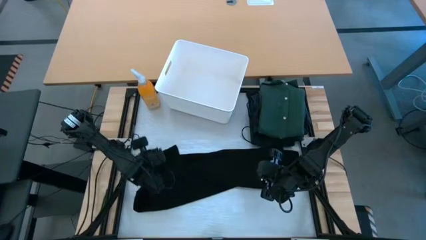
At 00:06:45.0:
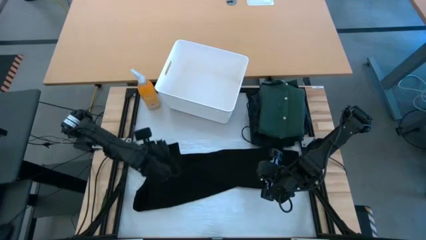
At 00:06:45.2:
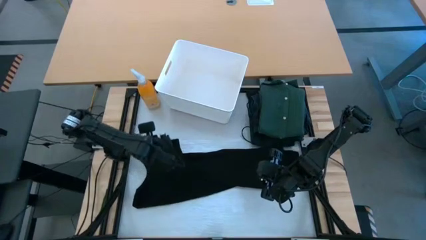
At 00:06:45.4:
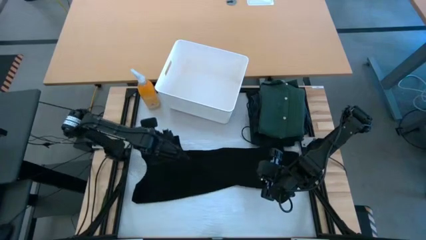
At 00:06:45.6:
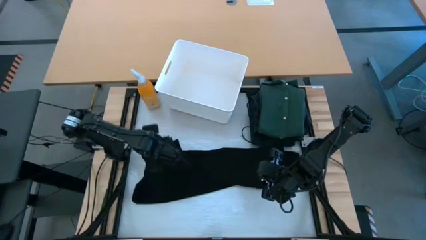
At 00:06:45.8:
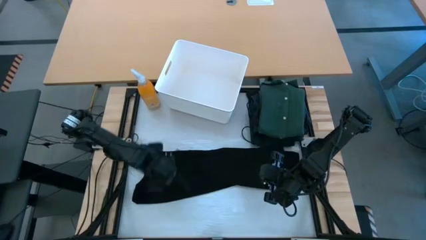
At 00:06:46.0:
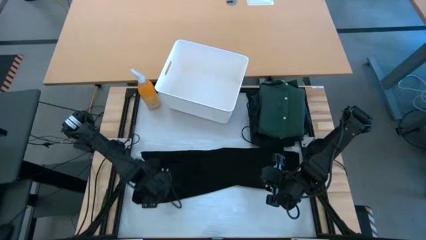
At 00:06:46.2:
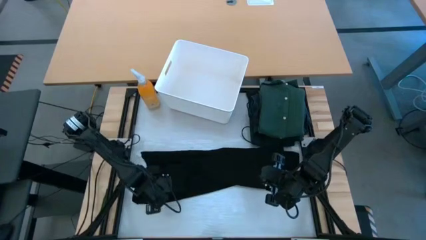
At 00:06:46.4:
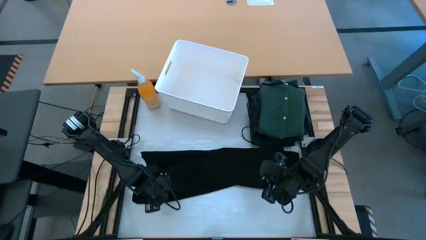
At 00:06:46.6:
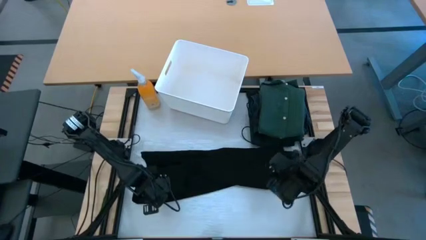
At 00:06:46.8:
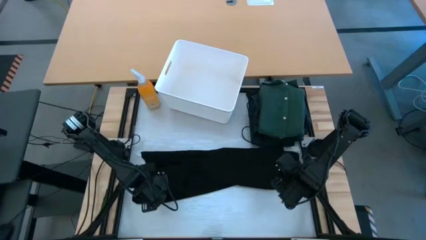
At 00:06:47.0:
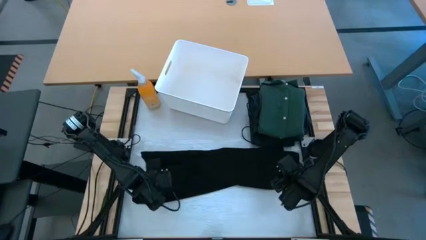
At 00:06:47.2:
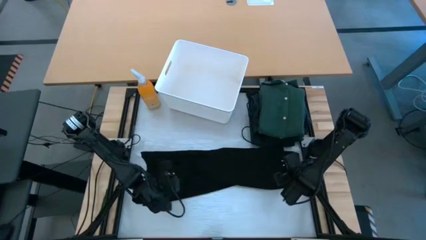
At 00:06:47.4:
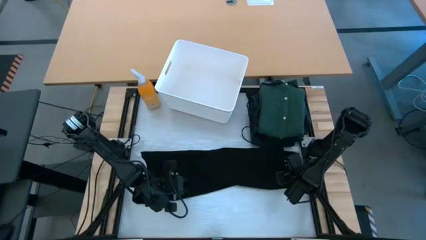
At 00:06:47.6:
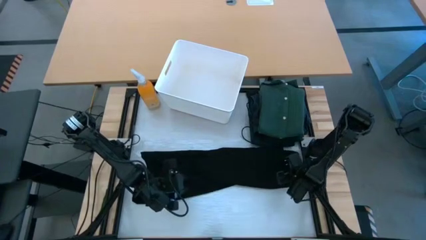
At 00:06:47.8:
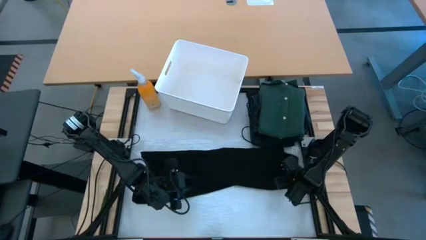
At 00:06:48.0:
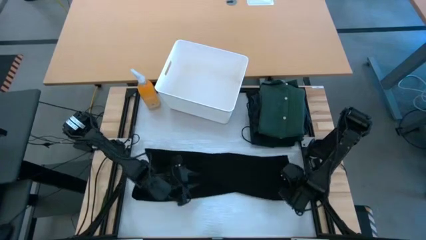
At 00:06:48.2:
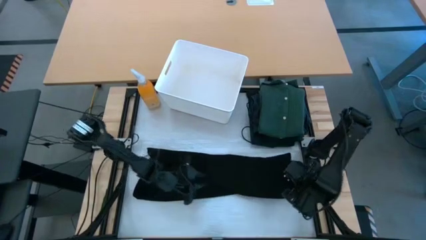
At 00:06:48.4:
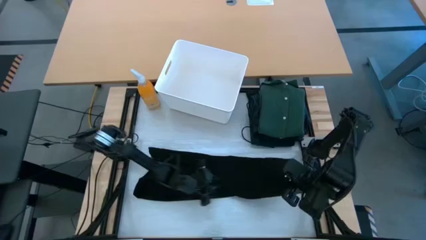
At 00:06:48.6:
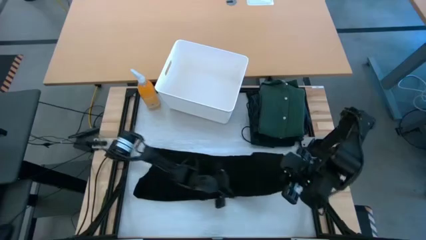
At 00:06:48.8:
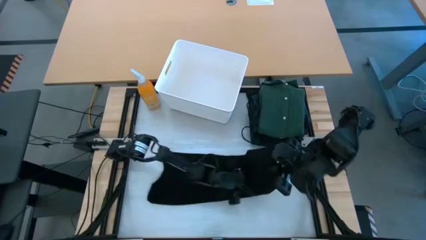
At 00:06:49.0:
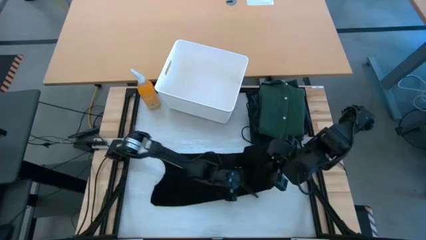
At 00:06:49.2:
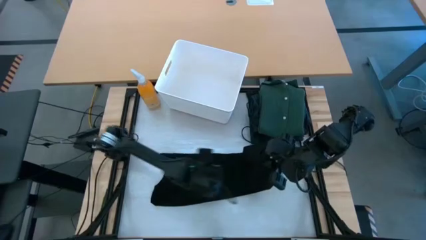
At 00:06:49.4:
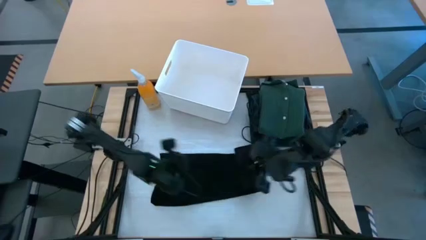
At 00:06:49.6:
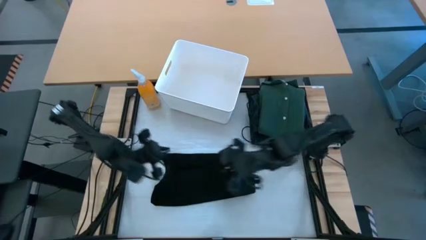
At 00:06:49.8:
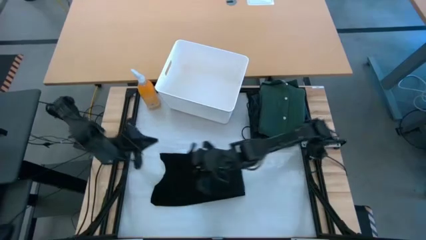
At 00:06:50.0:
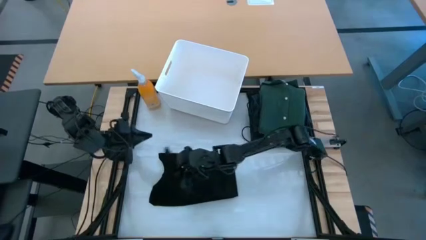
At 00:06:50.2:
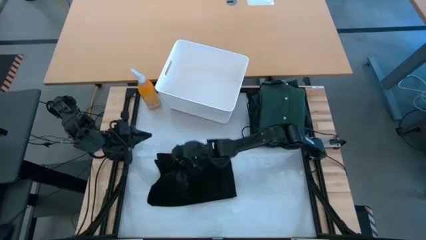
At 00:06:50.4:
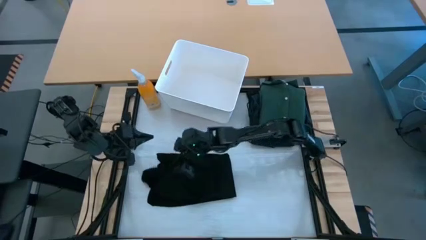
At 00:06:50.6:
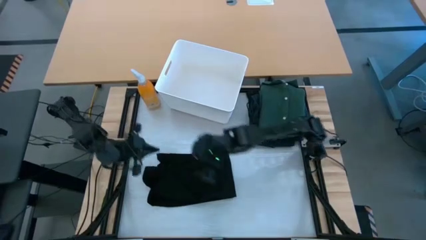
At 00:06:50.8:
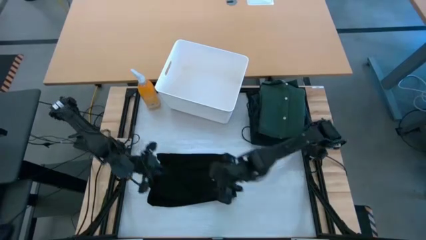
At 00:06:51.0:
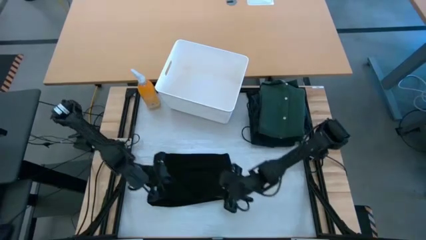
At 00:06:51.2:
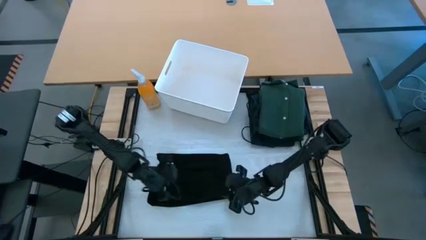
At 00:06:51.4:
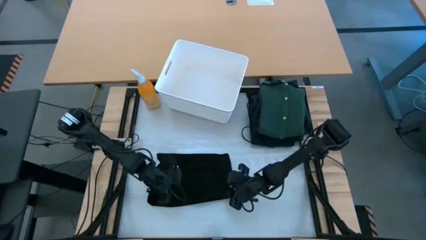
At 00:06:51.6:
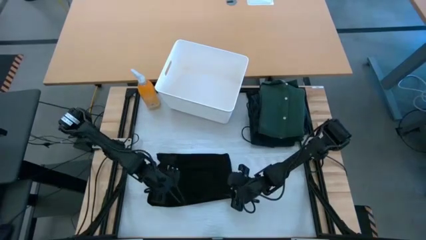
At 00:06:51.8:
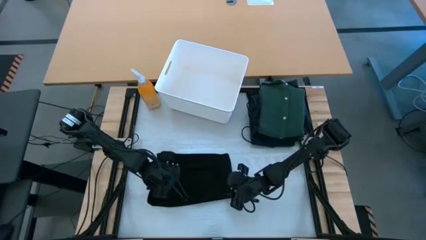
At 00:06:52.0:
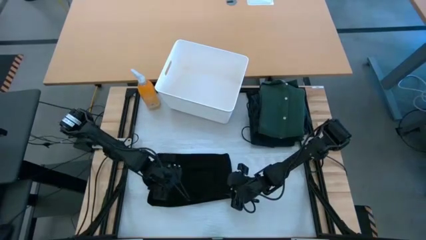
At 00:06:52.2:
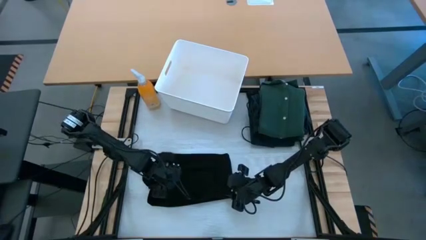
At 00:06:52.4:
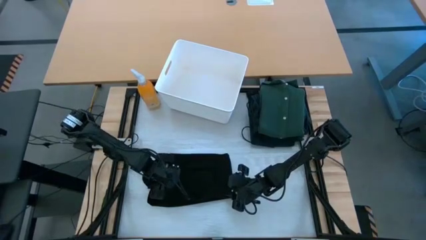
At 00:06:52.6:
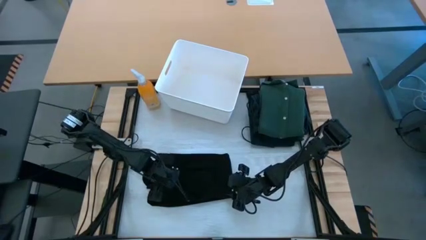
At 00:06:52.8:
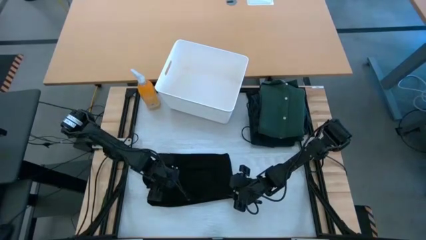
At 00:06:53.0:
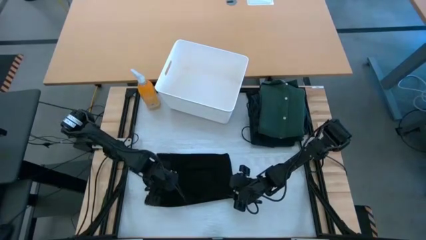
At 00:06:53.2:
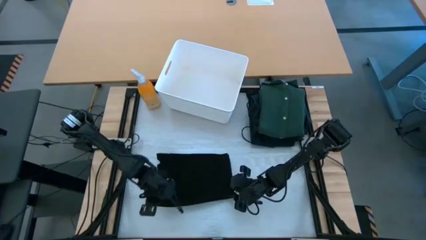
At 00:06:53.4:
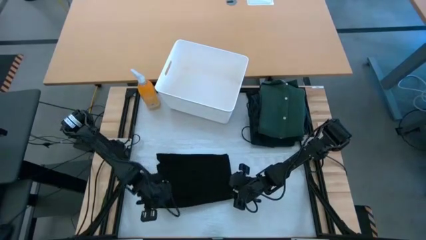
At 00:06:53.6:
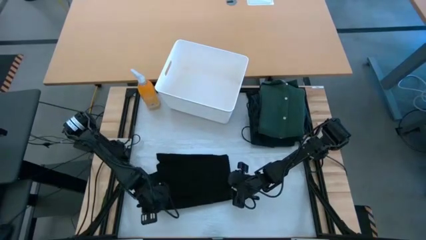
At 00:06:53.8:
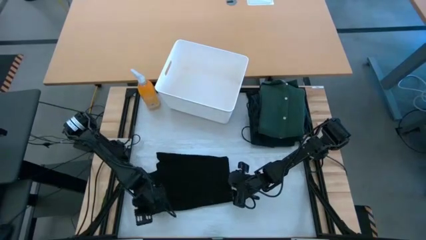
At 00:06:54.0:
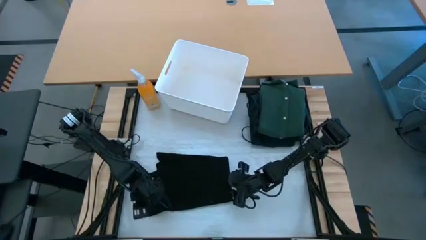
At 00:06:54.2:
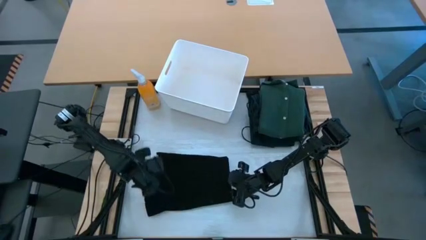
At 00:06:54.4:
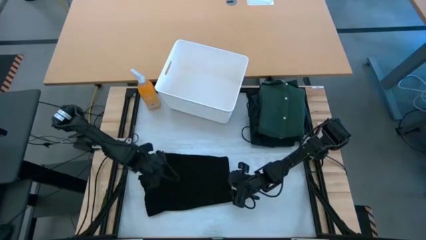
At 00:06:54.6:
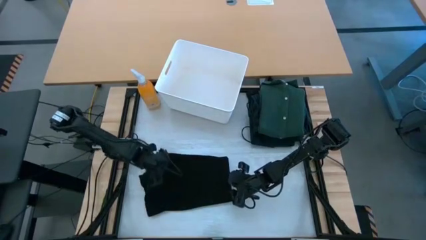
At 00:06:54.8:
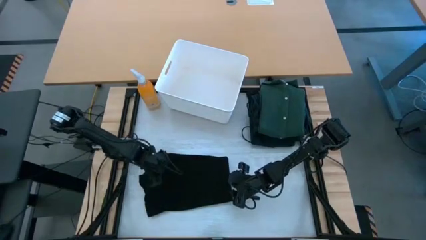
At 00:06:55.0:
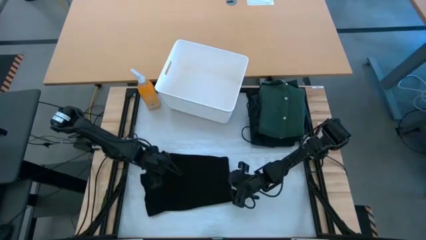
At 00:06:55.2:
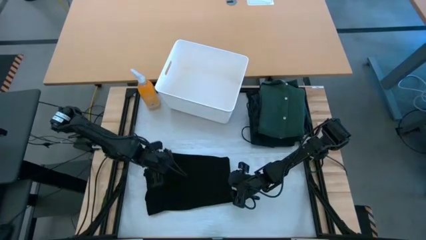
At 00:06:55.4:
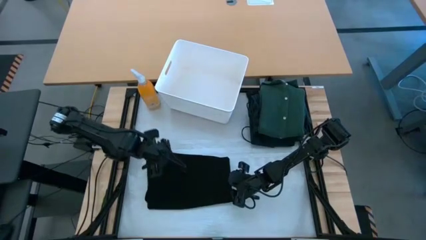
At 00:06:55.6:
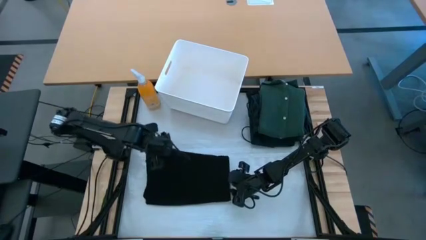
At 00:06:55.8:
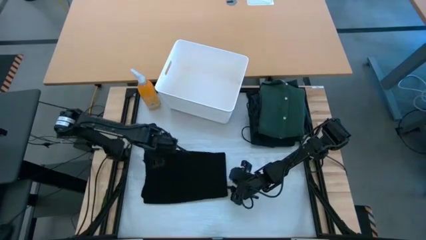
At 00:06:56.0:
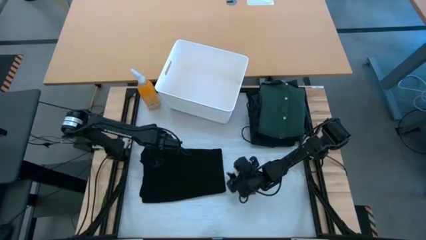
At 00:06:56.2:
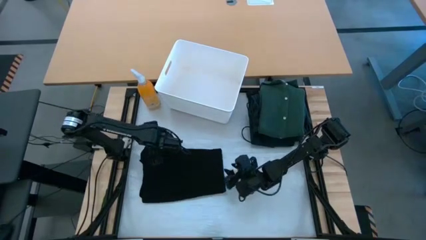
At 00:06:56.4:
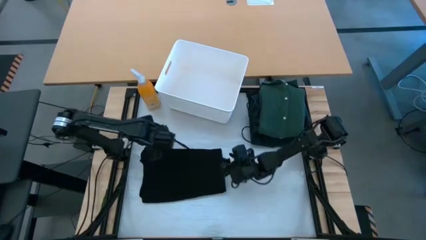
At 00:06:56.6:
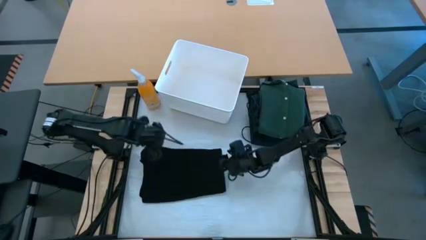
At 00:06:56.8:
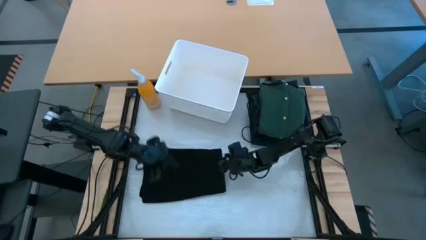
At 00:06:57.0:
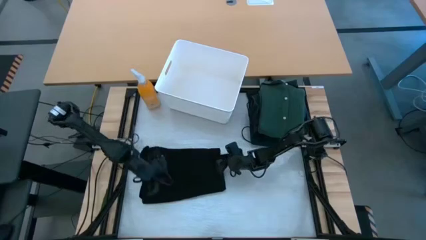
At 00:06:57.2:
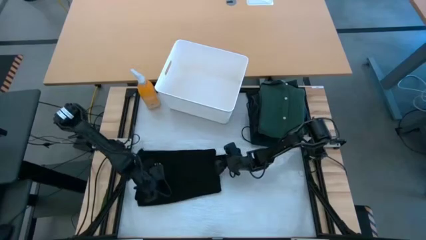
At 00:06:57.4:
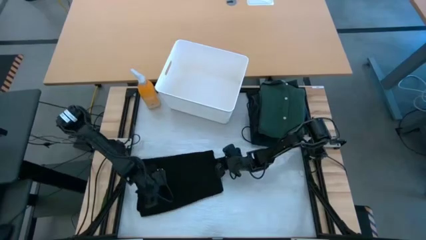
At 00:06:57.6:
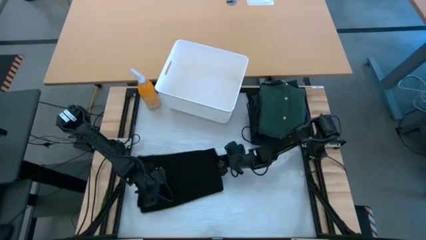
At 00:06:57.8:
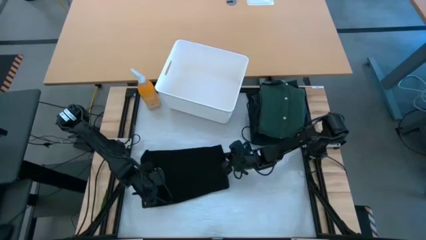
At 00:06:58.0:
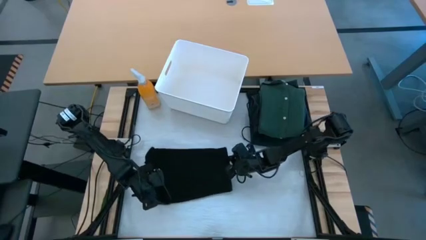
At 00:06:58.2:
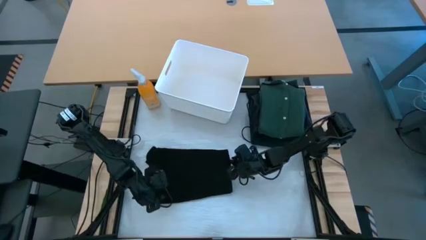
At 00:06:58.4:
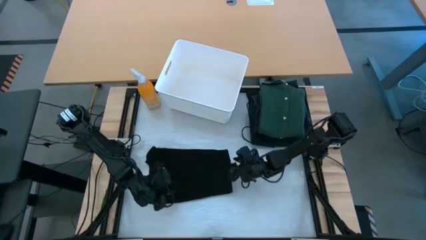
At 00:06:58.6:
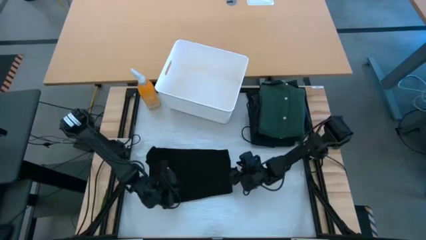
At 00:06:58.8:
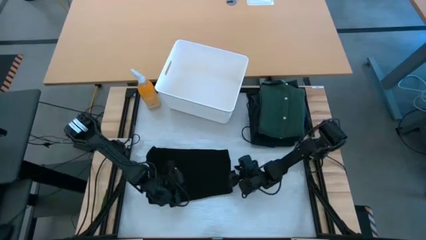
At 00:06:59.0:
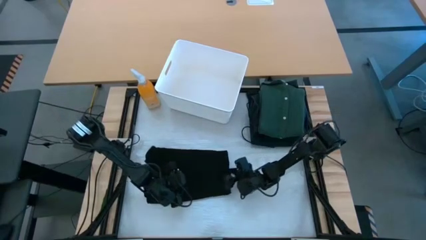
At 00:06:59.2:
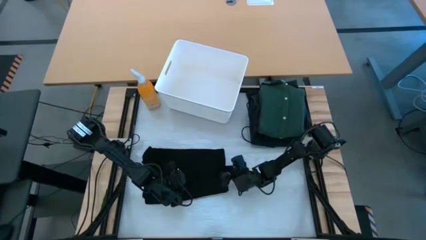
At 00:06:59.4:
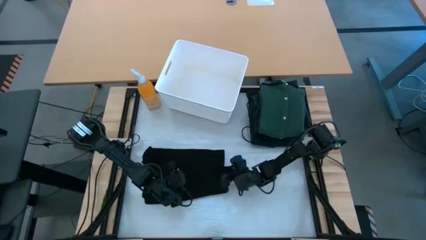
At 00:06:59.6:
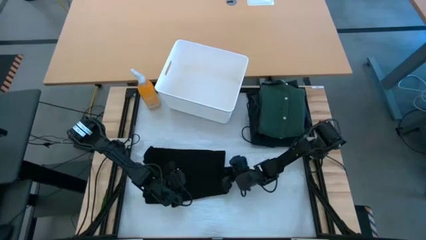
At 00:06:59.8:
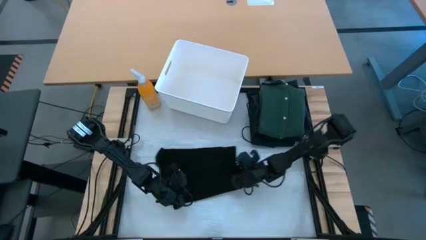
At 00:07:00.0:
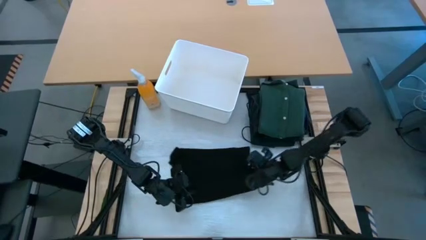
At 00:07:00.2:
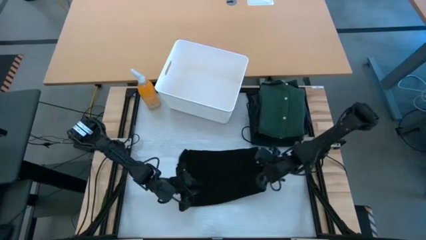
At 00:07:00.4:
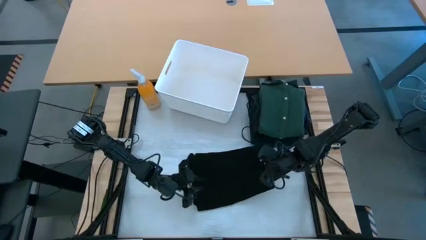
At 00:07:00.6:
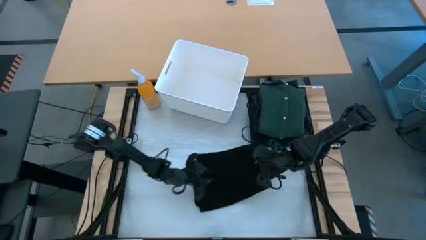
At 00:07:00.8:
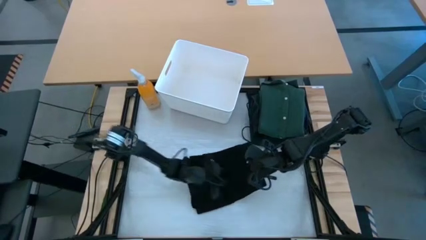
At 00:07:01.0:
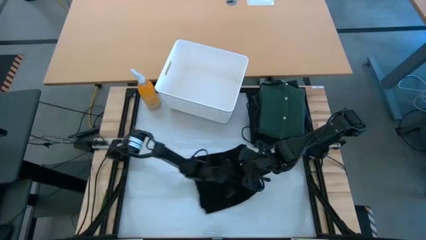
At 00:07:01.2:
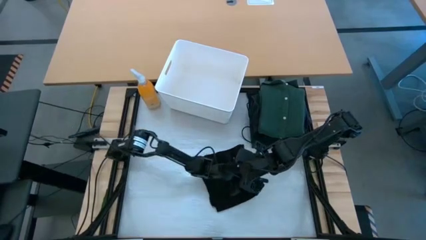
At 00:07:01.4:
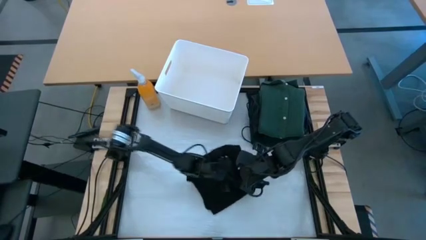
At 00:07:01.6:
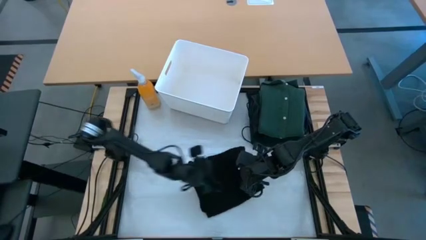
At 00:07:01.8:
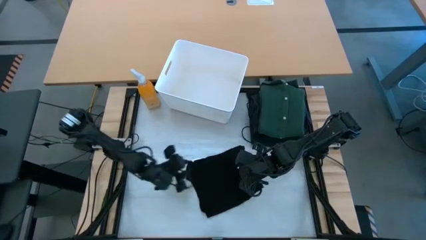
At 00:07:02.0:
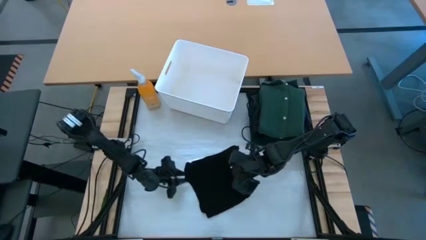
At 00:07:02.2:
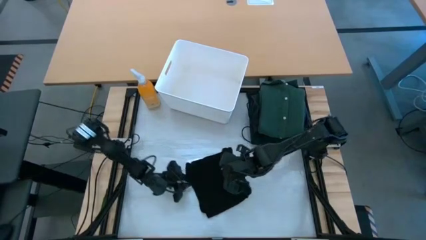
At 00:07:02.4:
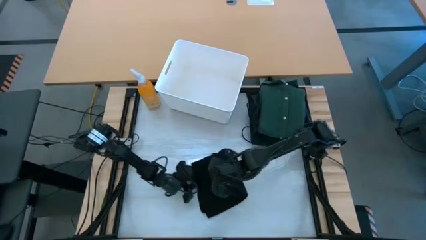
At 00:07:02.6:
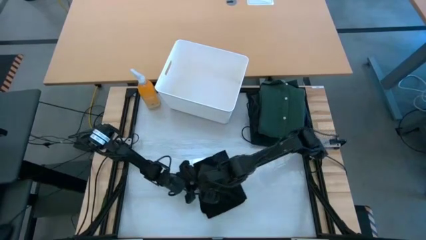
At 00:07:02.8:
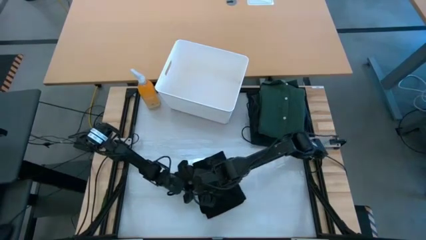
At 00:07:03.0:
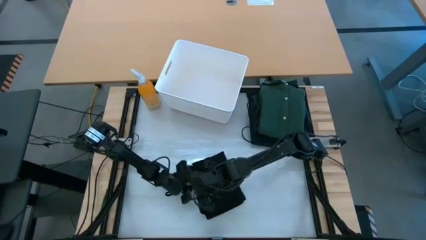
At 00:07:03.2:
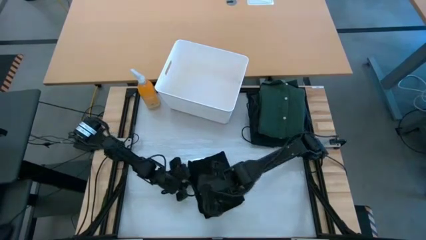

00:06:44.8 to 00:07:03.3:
Task: Fold laundry
Fold the black shirt
